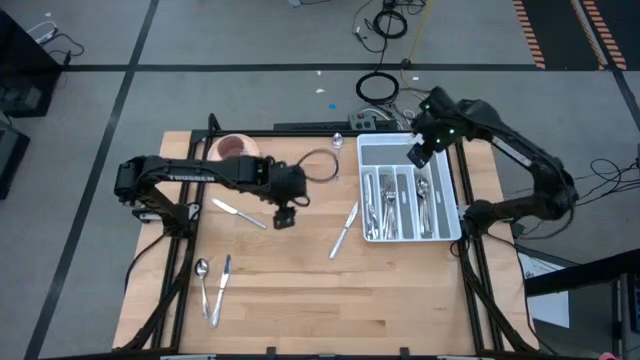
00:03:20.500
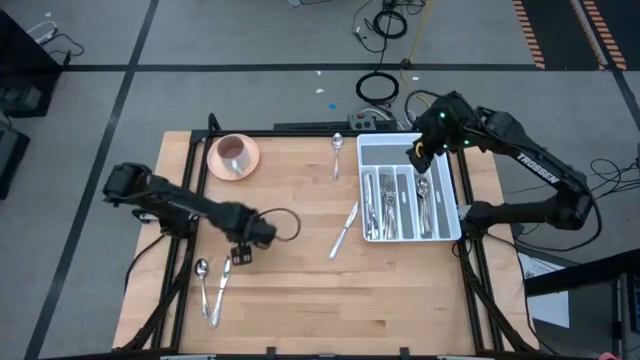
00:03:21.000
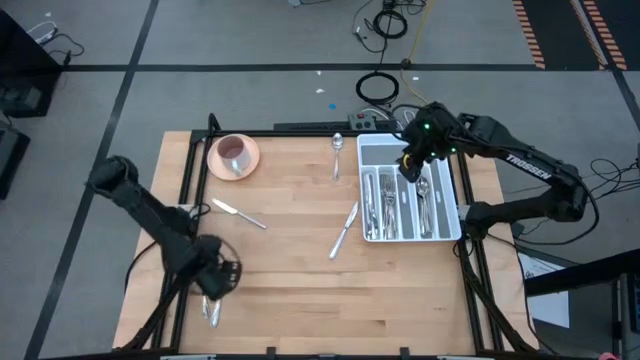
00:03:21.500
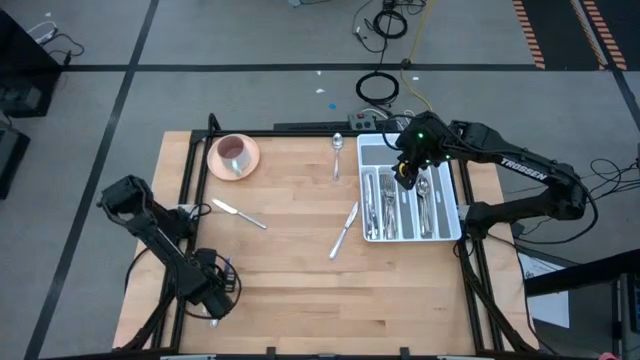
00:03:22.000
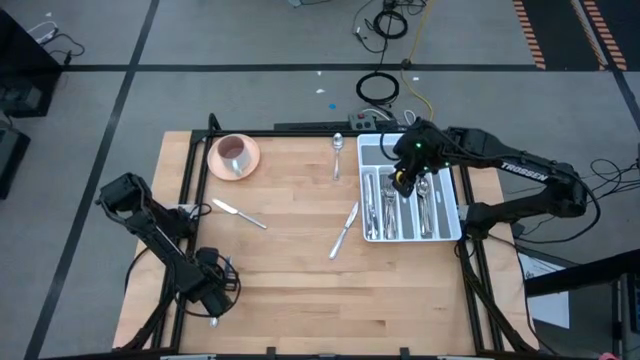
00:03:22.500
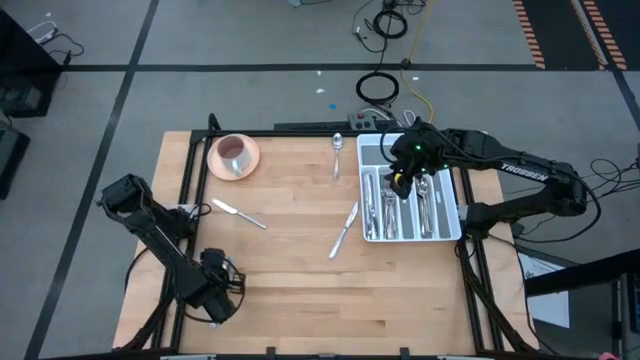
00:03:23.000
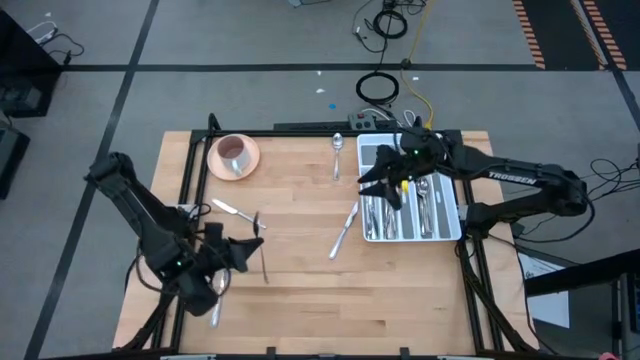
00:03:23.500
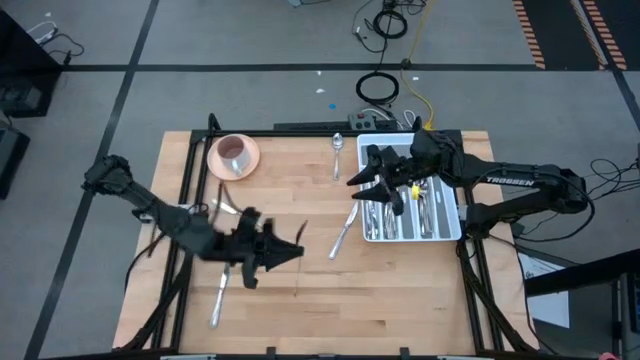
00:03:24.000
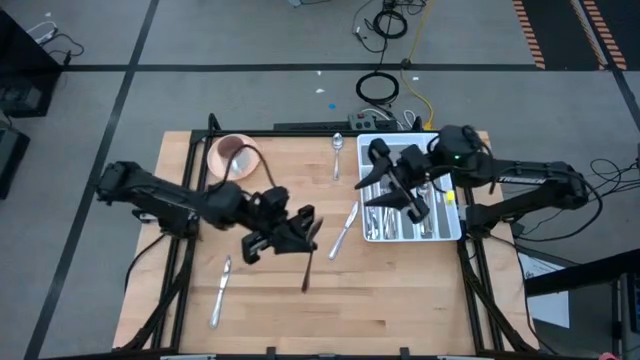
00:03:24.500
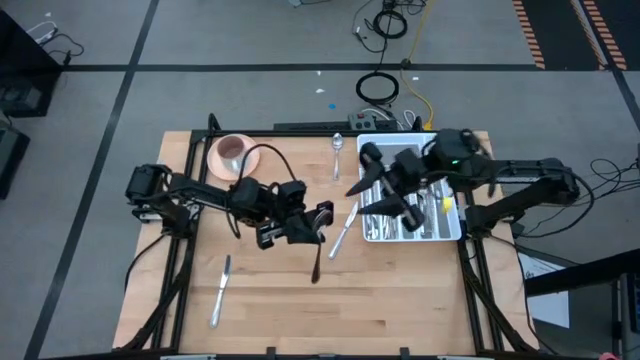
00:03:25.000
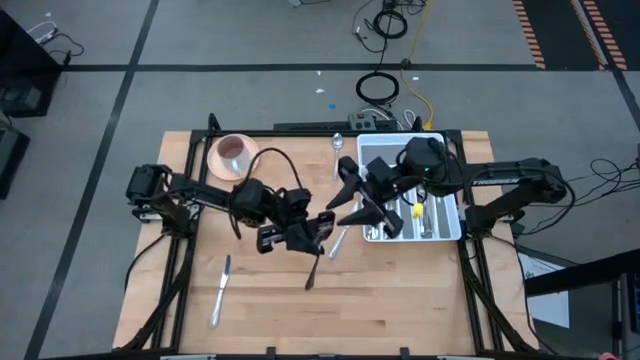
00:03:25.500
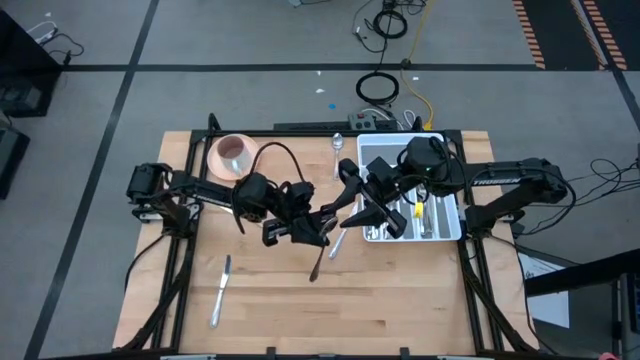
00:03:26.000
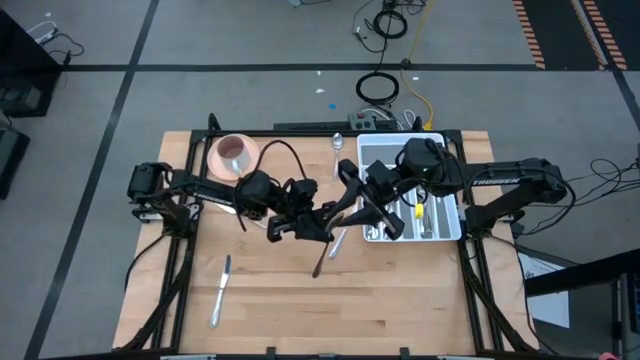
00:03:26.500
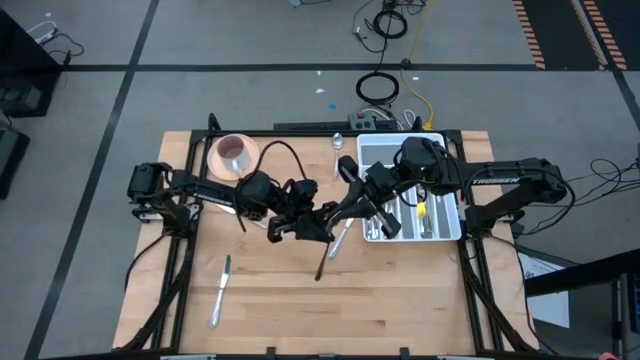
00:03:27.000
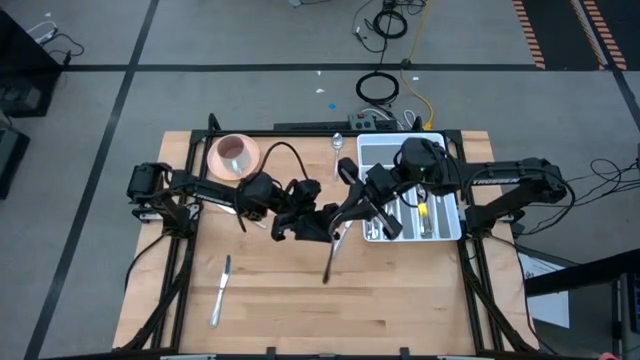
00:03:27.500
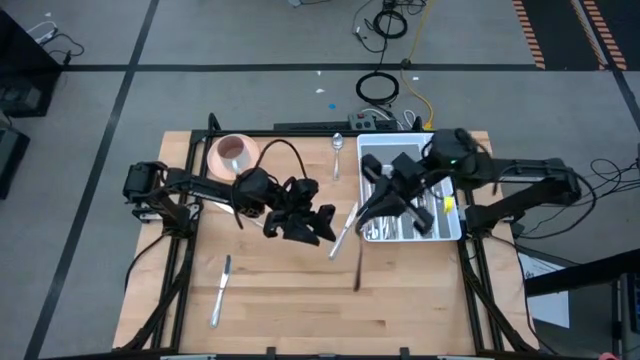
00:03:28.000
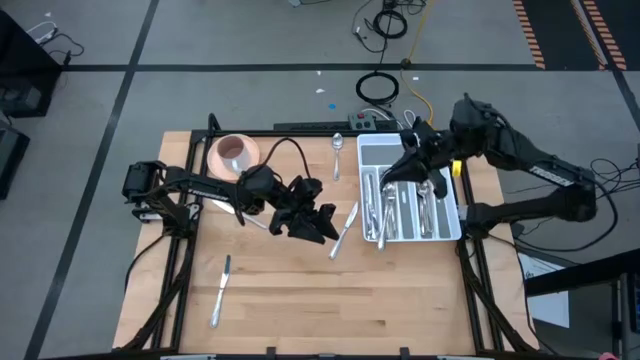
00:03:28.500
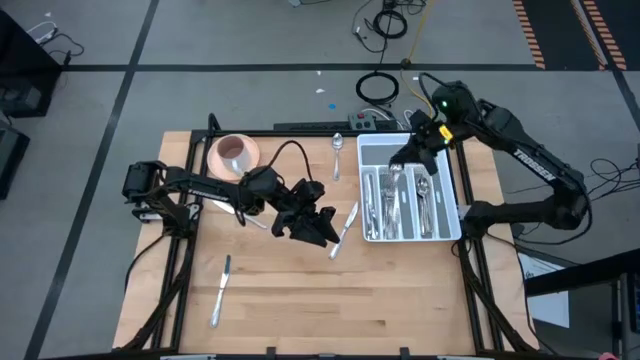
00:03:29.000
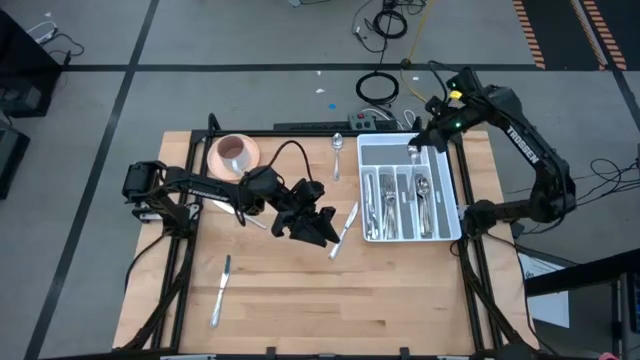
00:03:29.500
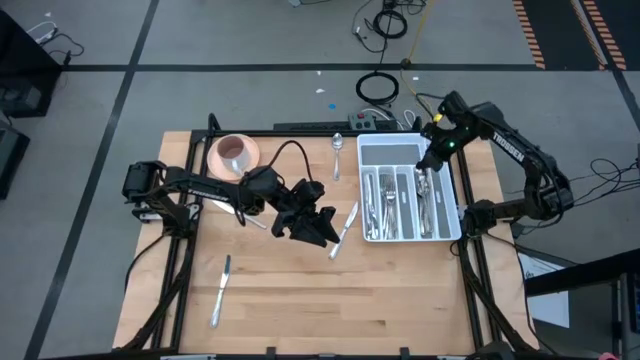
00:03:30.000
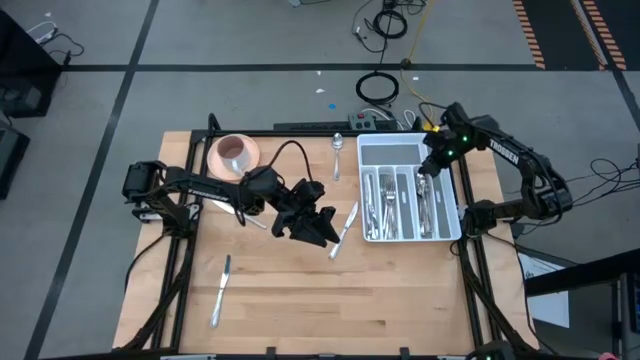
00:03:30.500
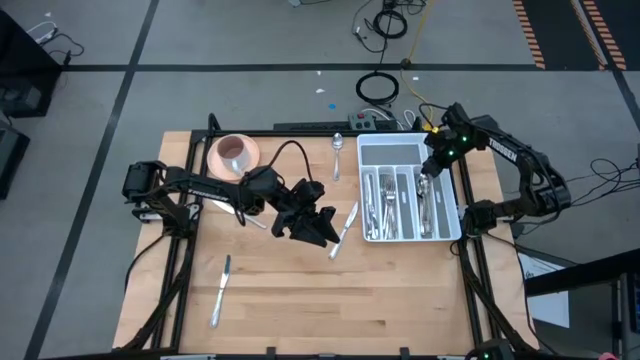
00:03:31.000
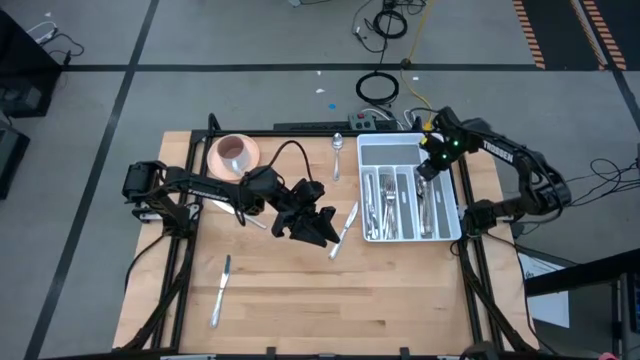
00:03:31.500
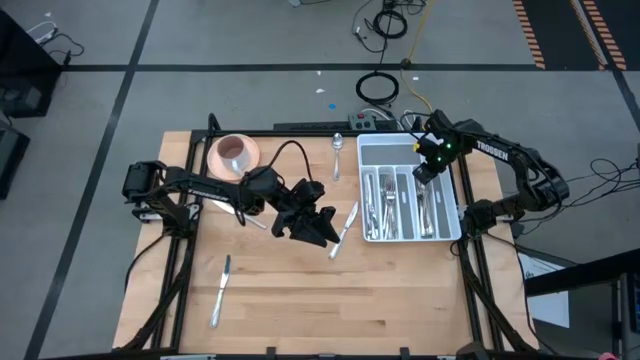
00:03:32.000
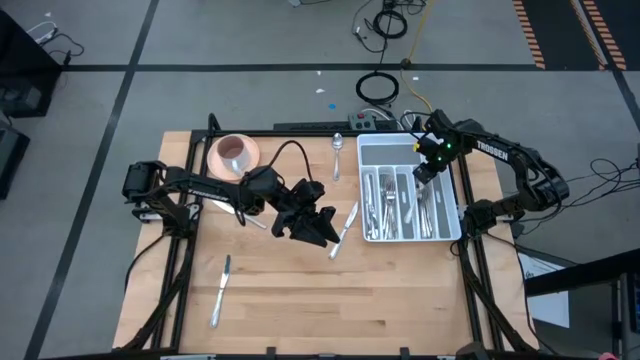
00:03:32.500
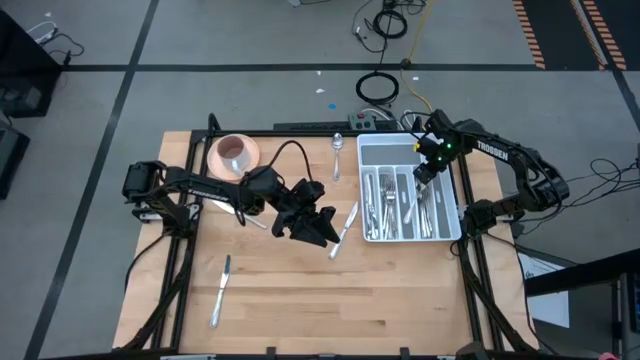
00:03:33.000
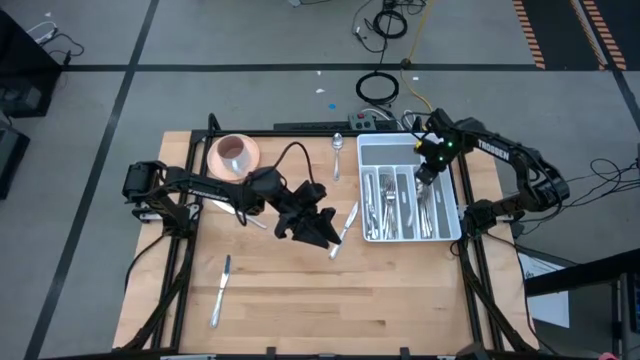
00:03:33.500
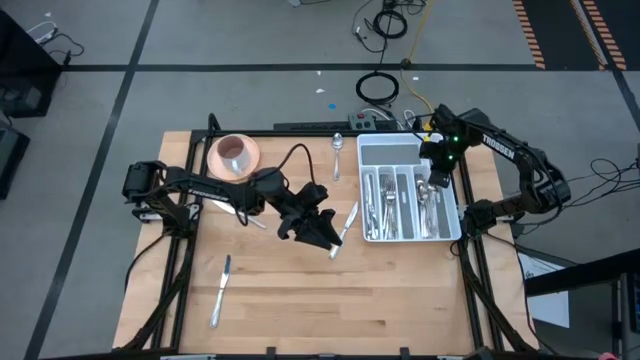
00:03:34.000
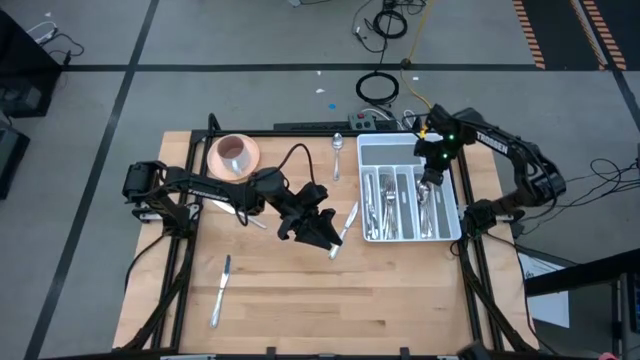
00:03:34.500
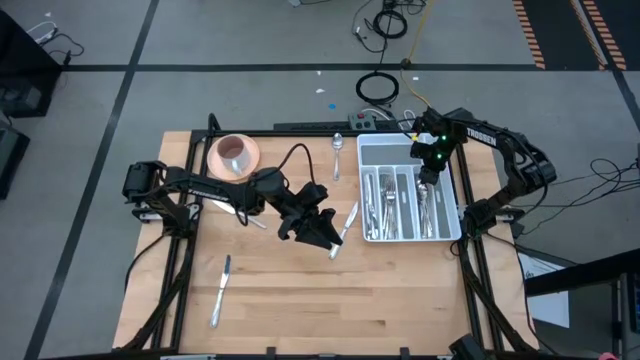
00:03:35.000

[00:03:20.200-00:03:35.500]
Task: Sort silverware
Put the silver spoon into the silverware rack

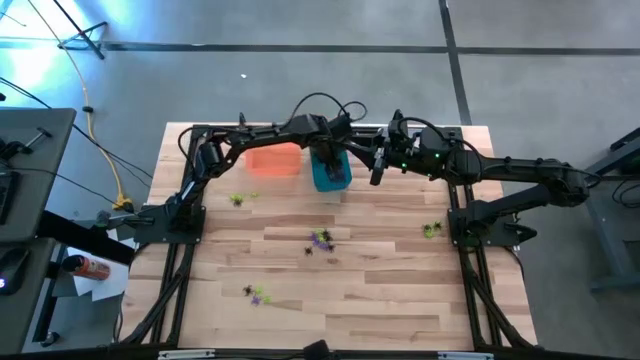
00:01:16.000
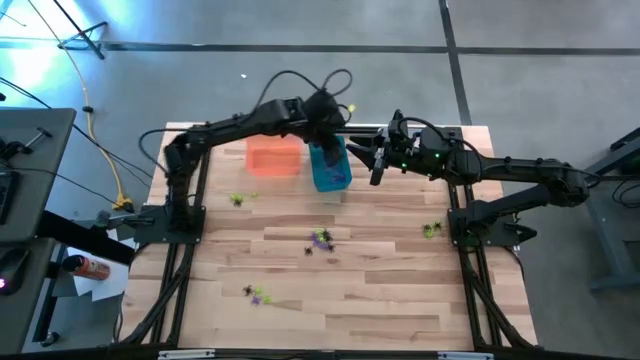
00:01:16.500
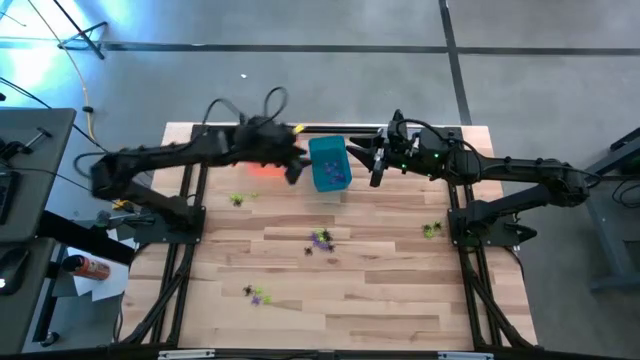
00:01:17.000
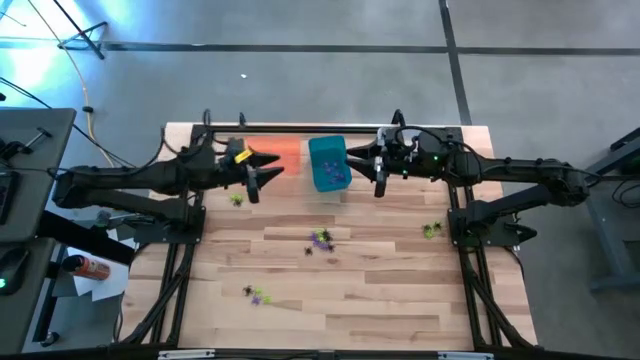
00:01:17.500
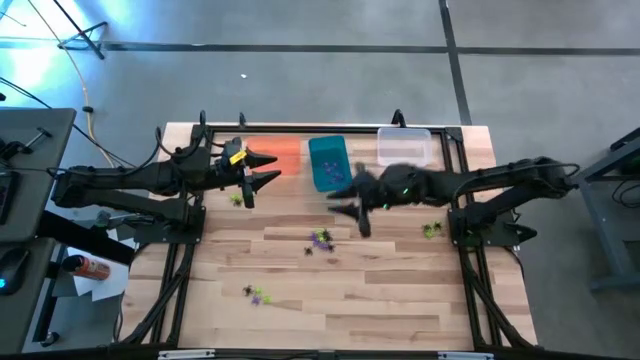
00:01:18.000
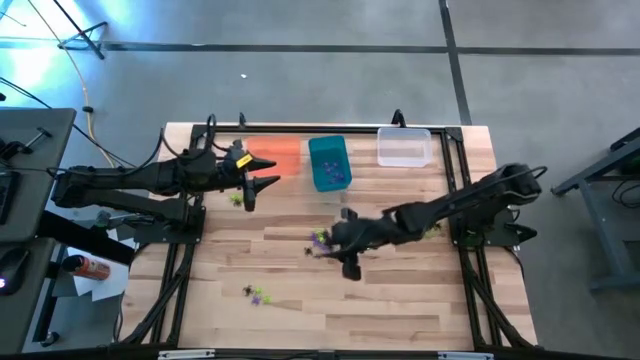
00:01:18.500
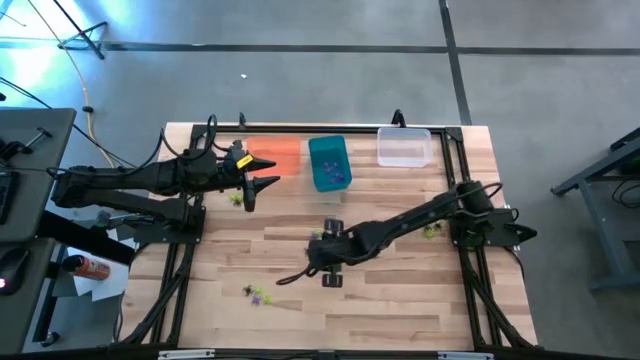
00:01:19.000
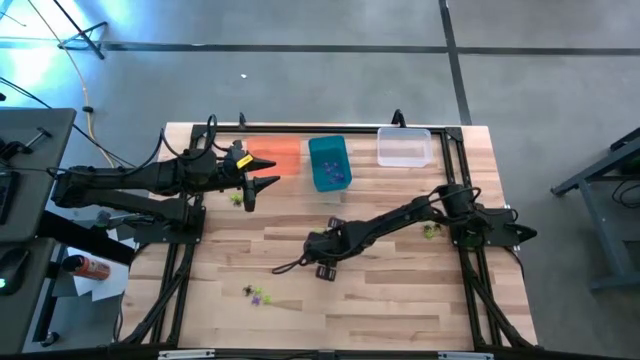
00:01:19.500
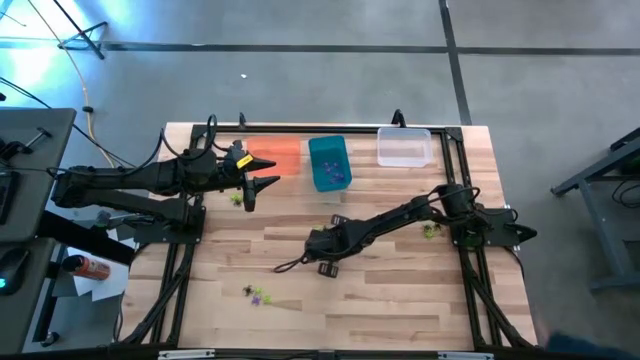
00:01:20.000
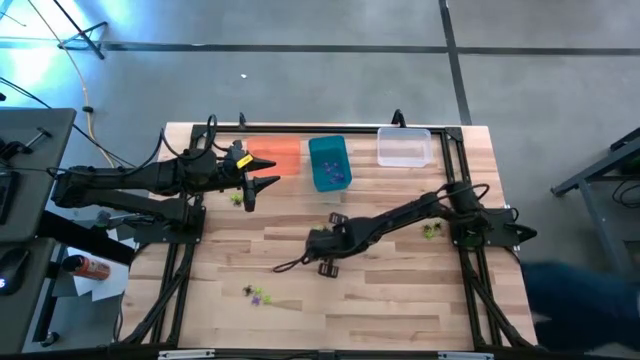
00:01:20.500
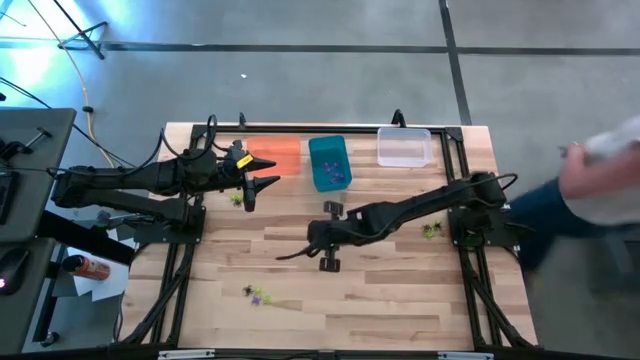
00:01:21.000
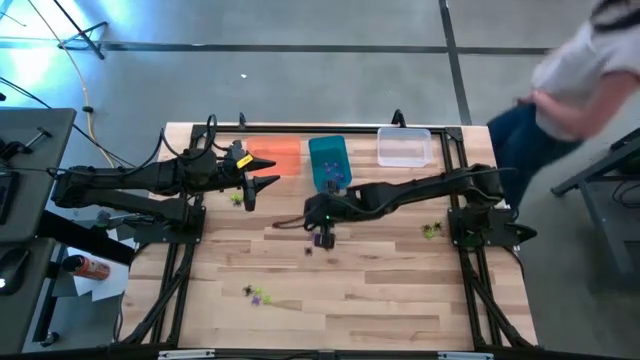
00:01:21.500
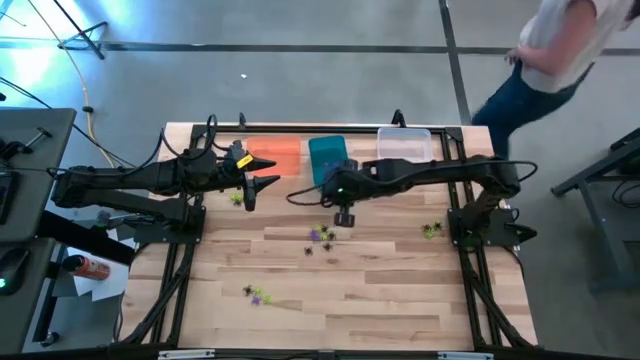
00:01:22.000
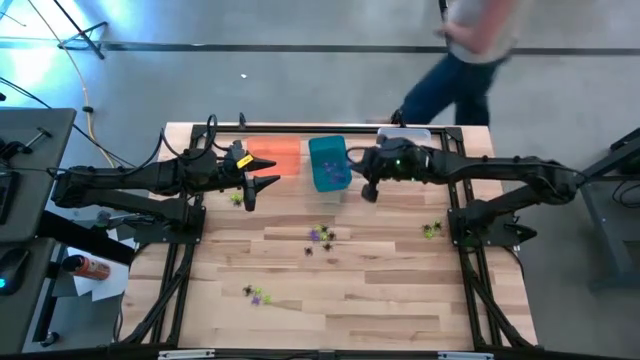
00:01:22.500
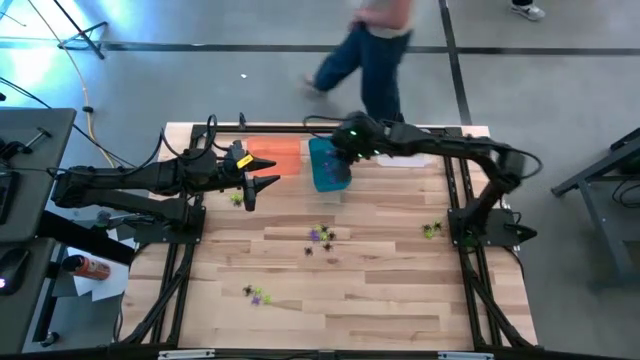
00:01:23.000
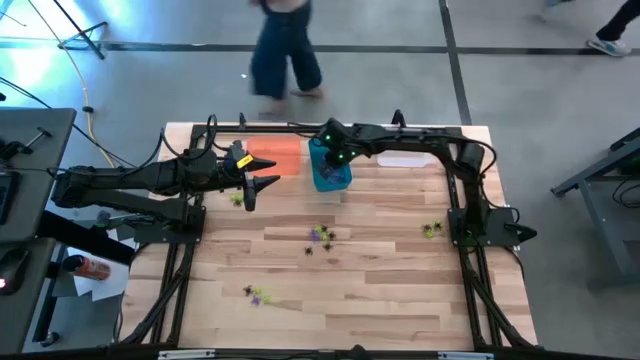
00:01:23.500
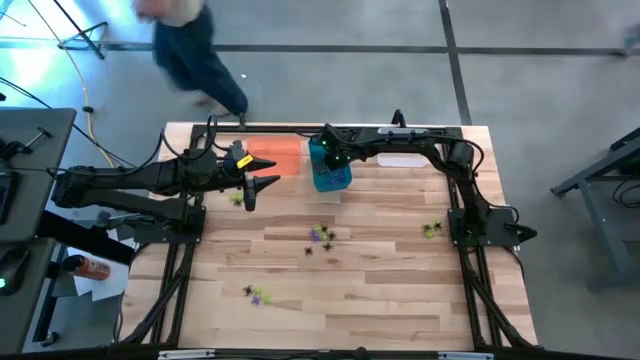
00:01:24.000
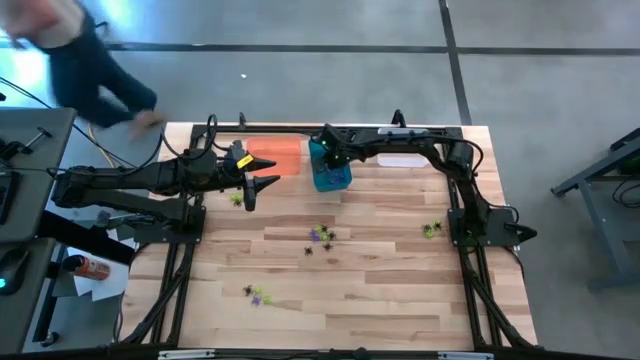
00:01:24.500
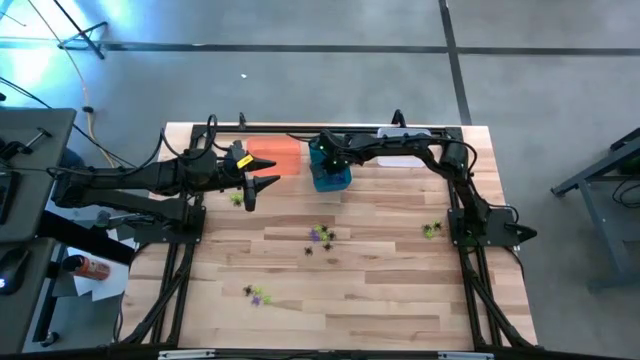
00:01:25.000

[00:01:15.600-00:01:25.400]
Task: Sort Halloween decoration
Put the purple spider toy into the blue bin
